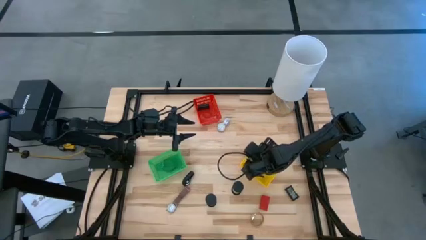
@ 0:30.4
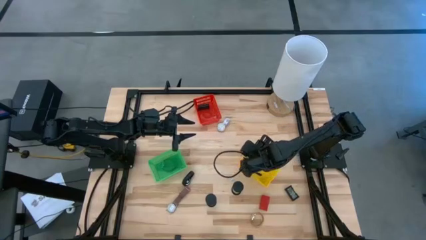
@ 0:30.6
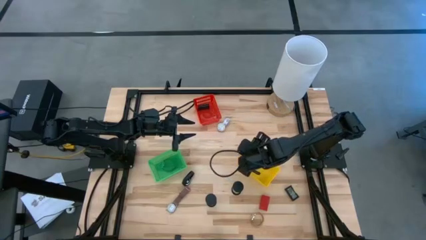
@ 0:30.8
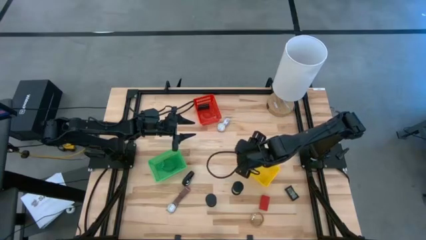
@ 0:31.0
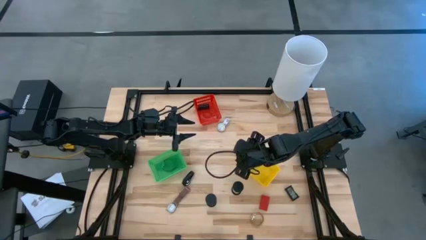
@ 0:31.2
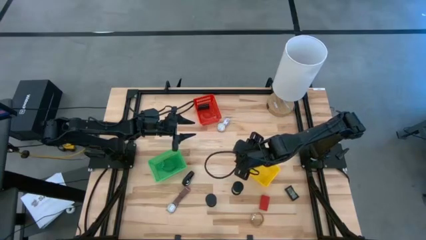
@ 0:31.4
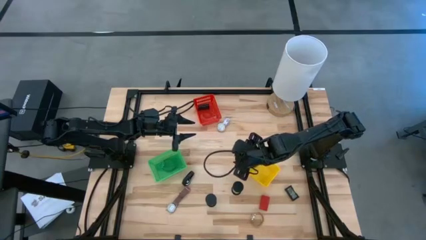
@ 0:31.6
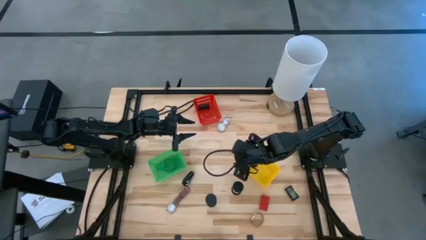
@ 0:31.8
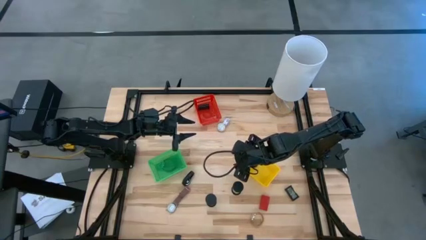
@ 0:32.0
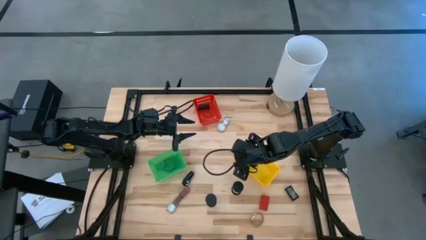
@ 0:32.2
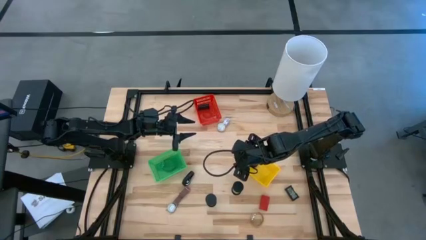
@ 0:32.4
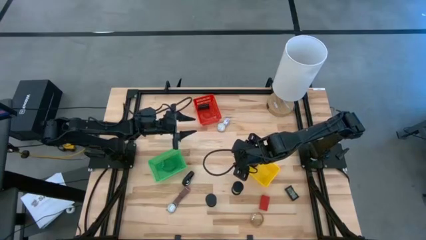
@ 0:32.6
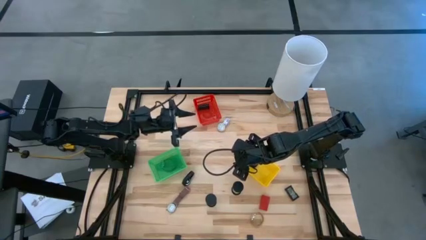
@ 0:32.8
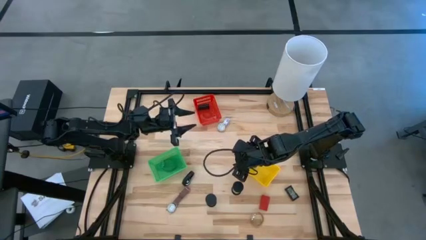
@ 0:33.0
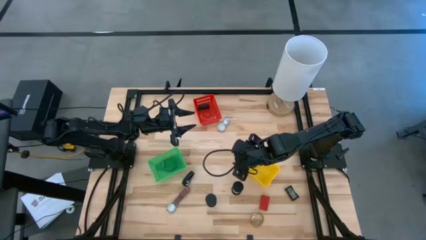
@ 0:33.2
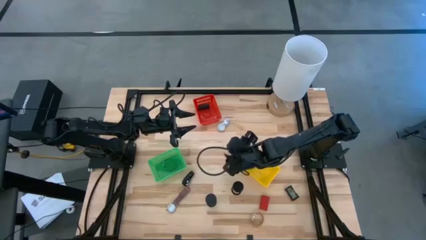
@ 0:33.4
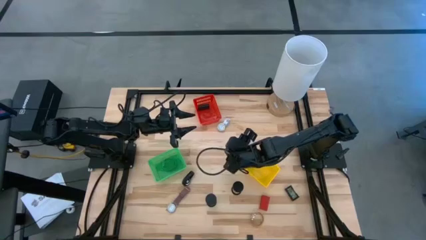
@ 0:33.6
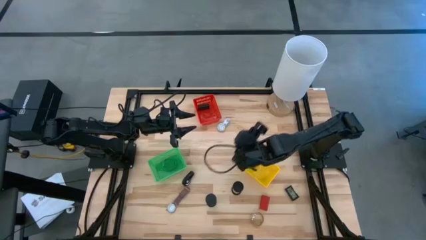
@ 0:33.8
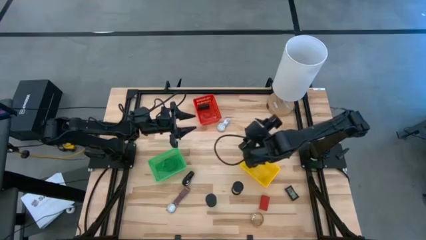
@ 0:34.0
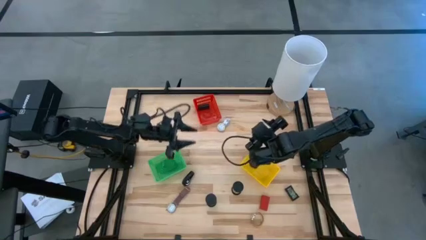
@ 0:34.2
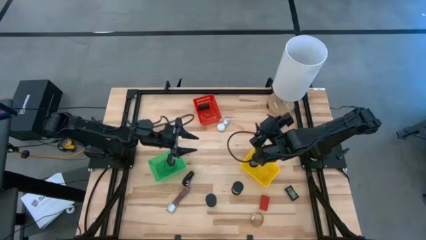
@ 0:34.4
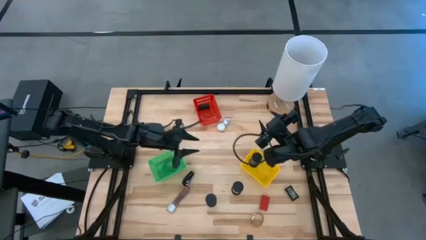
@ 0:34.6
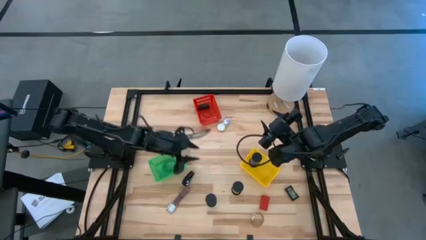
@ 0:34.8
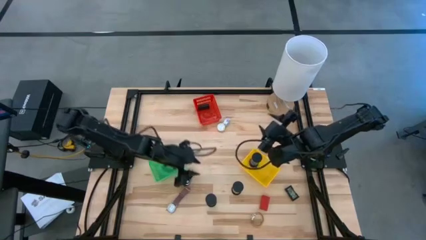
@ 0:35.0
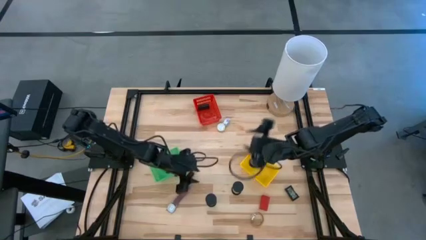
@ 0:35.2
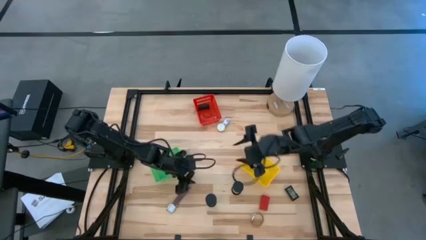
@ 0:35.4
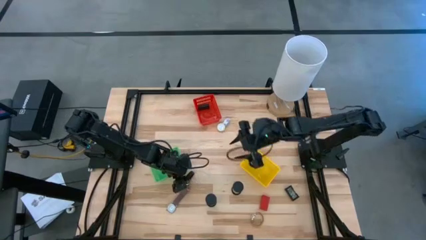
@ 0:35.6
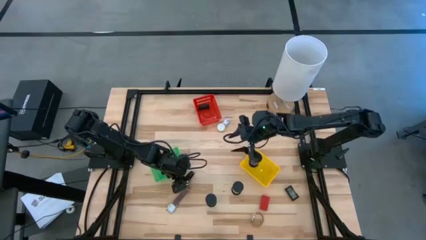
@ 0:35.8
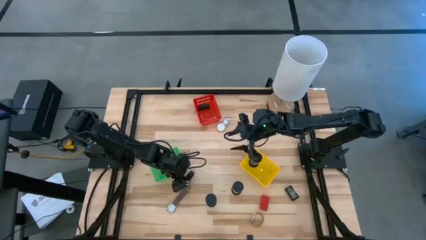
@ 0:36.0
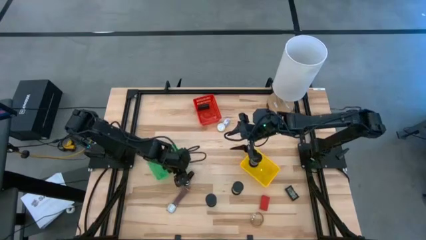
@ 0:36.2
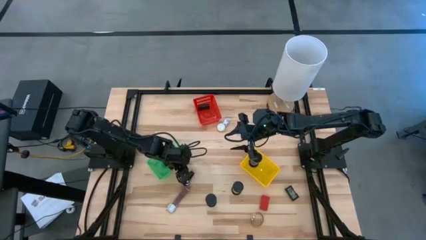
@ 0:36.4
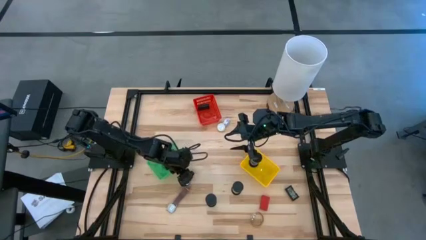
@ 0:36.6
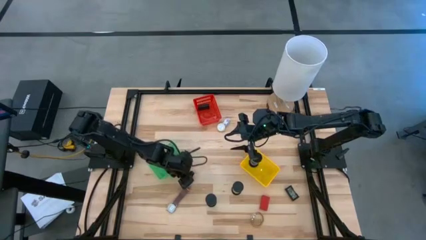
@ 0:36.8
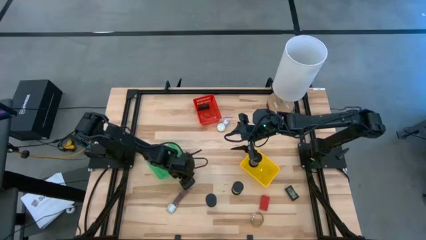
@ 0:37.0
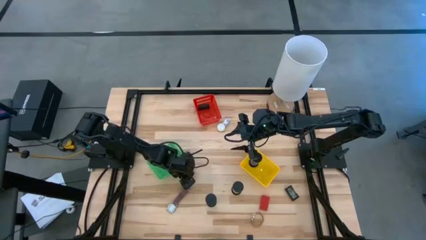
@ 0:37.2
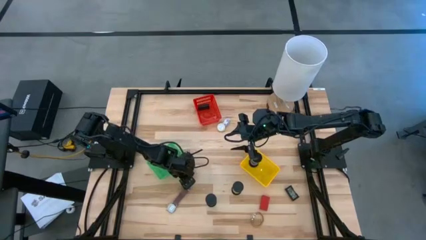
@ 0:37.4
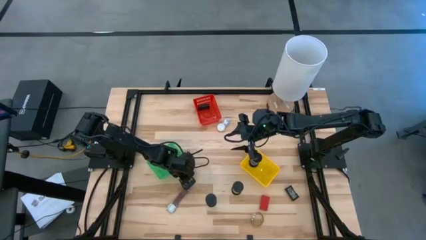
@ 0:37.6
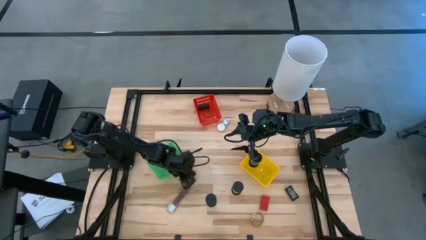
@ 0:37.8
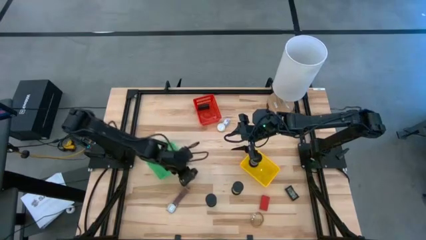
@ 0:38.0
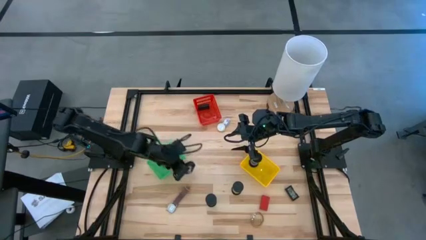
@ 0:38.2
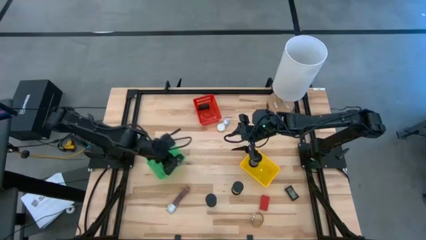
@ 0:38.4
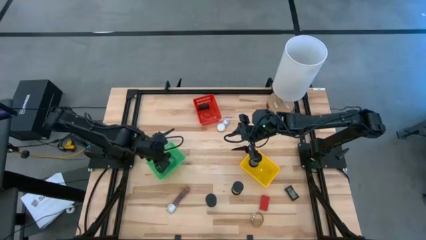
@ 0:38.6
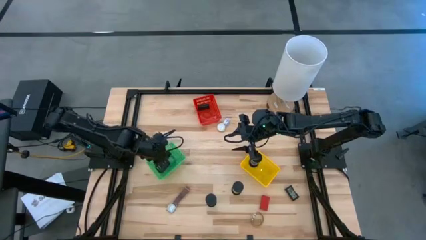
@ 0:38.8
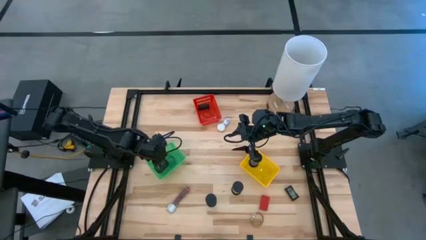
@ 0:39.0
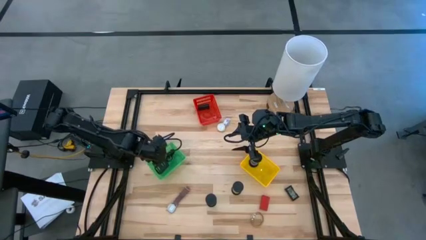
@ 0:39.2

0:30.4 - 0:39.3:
Task: Pick & Place Office items
Put the black wrist watch into the green bin

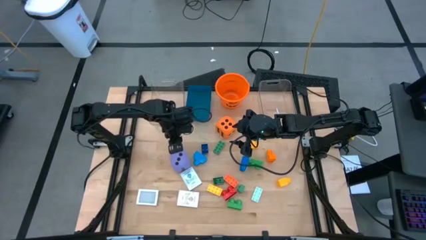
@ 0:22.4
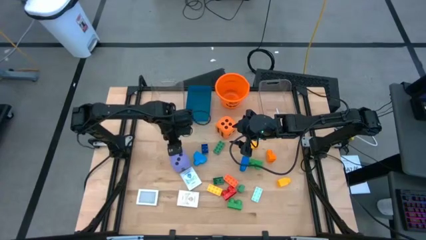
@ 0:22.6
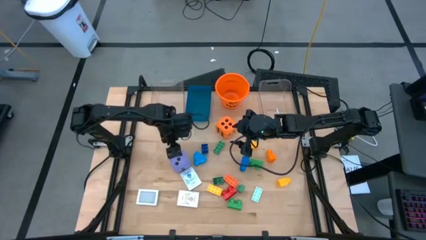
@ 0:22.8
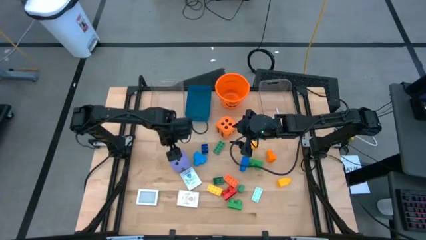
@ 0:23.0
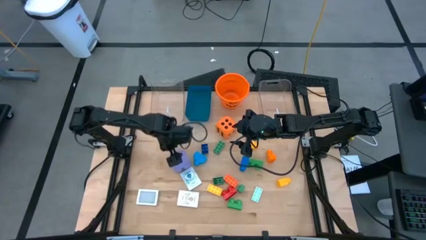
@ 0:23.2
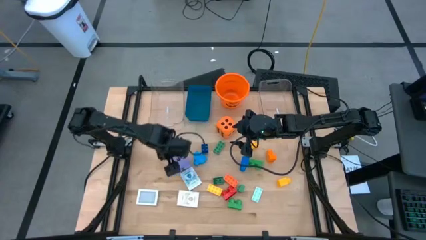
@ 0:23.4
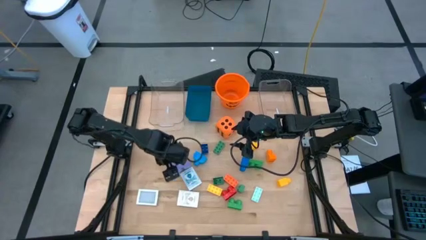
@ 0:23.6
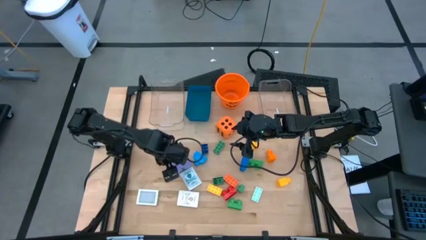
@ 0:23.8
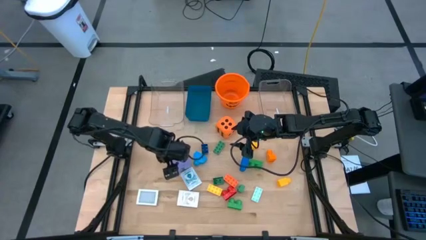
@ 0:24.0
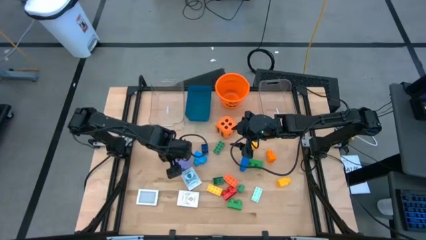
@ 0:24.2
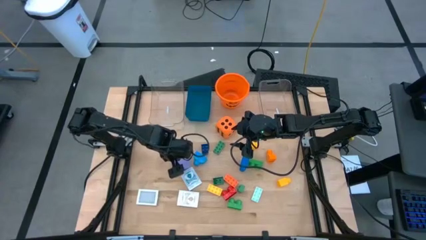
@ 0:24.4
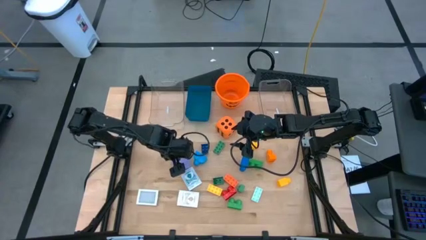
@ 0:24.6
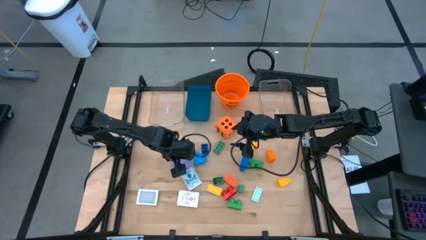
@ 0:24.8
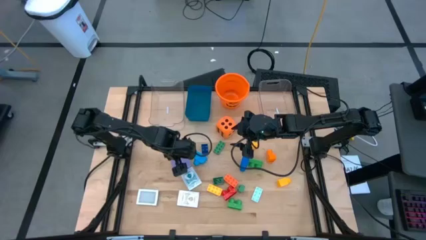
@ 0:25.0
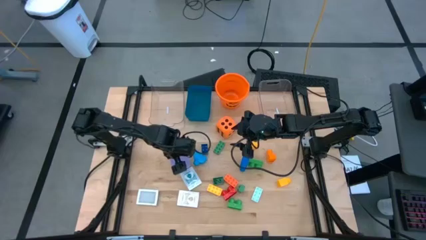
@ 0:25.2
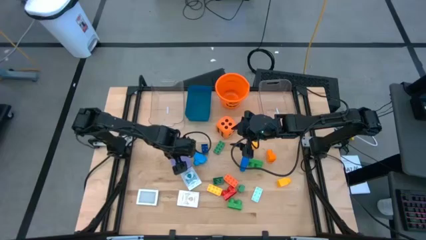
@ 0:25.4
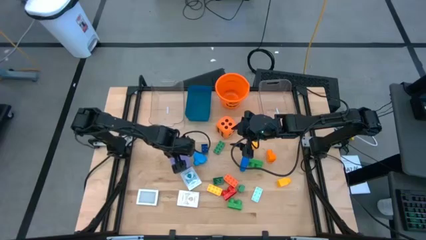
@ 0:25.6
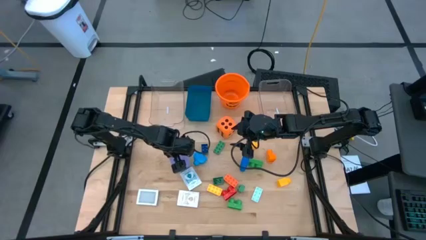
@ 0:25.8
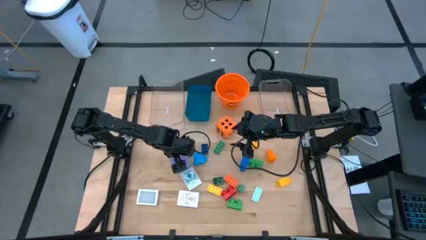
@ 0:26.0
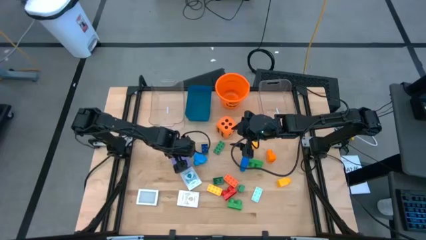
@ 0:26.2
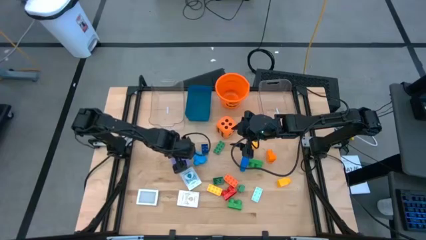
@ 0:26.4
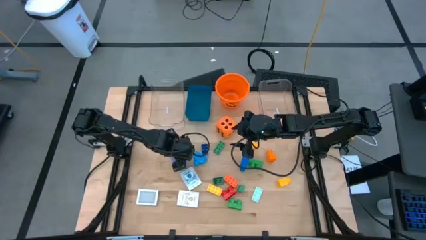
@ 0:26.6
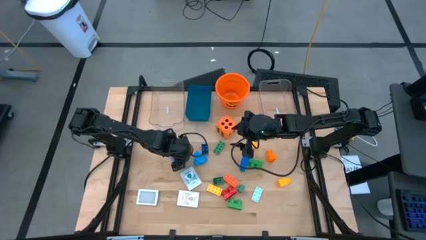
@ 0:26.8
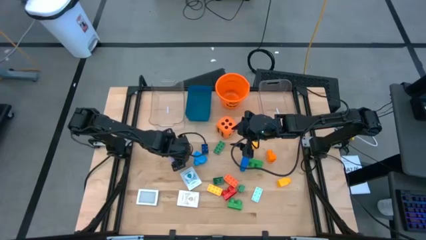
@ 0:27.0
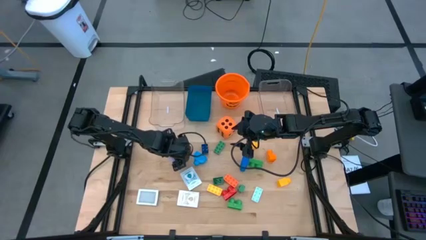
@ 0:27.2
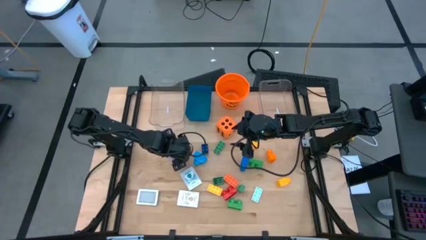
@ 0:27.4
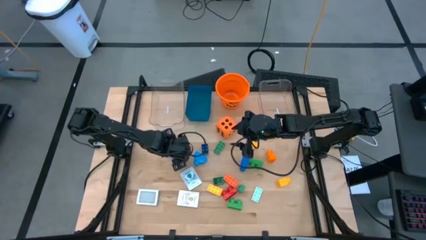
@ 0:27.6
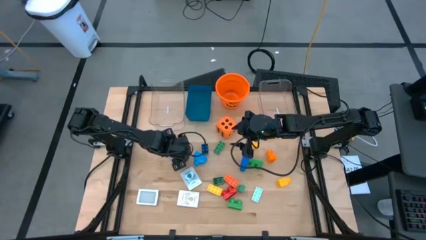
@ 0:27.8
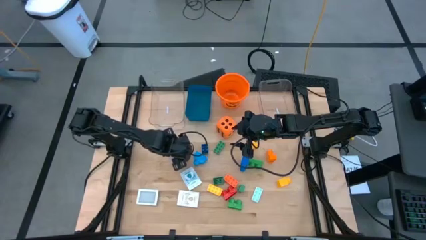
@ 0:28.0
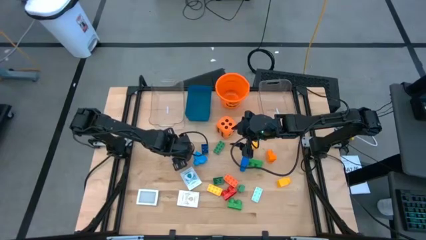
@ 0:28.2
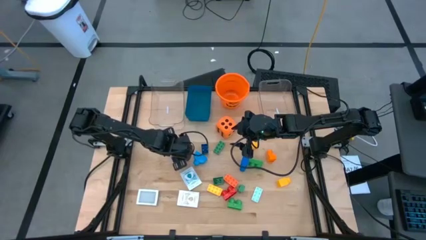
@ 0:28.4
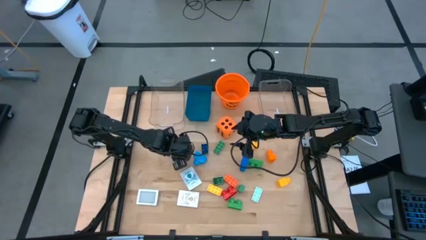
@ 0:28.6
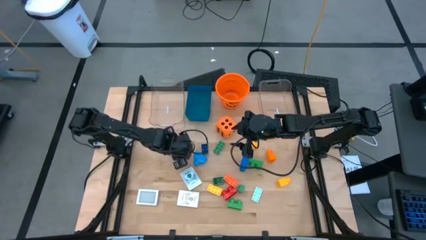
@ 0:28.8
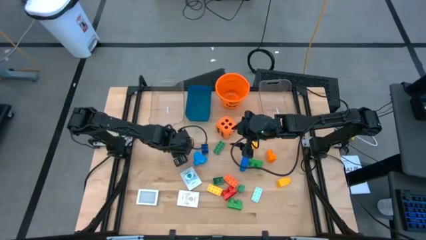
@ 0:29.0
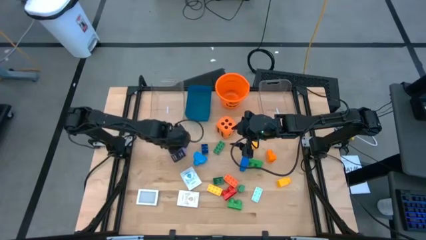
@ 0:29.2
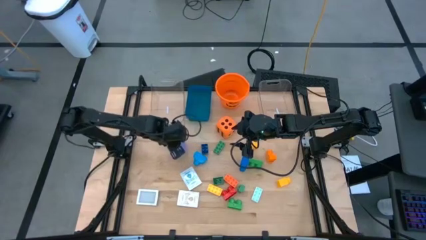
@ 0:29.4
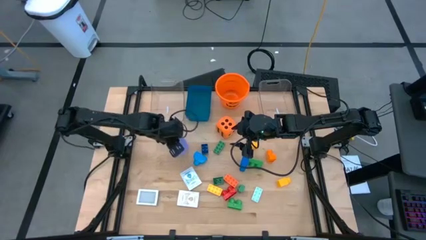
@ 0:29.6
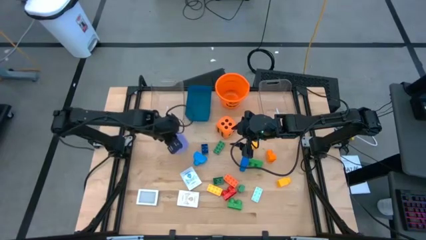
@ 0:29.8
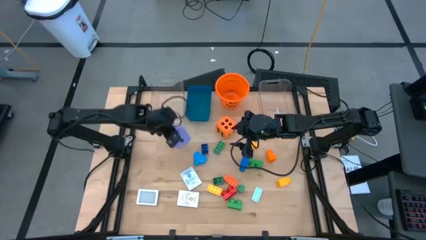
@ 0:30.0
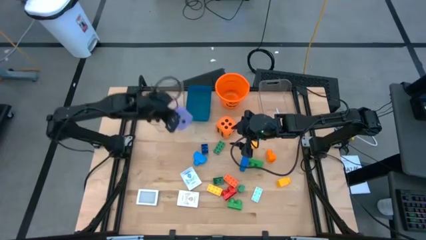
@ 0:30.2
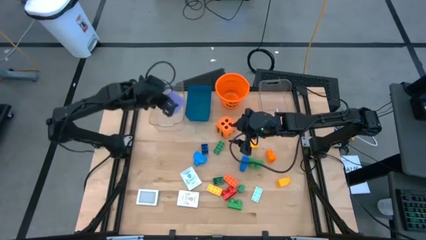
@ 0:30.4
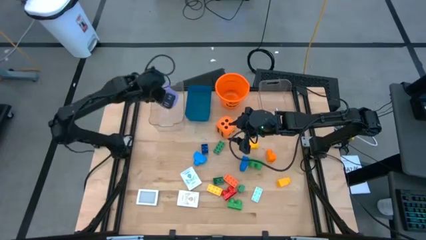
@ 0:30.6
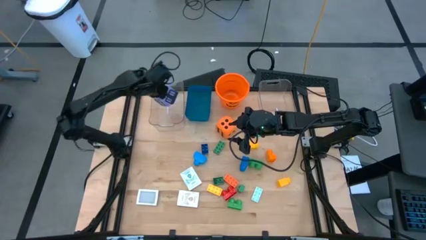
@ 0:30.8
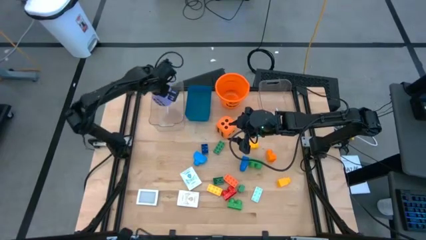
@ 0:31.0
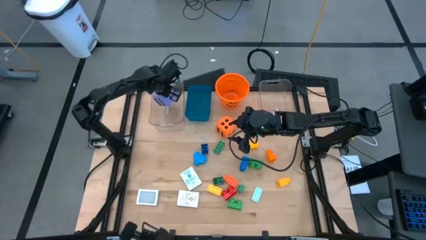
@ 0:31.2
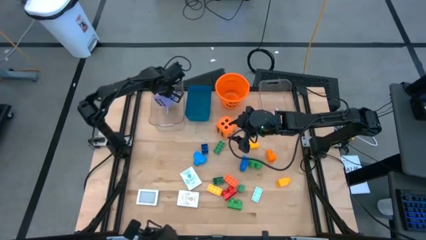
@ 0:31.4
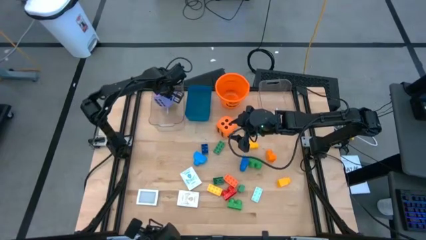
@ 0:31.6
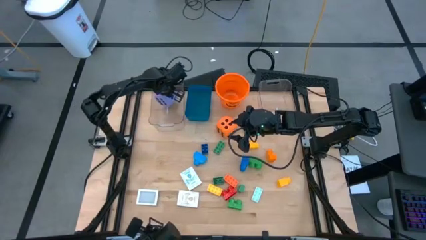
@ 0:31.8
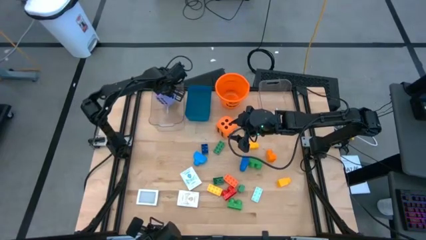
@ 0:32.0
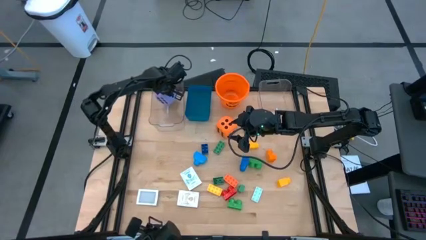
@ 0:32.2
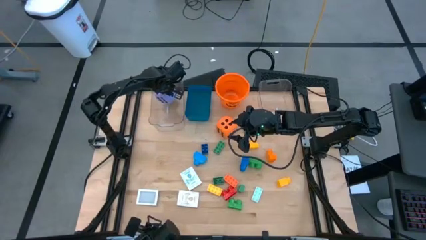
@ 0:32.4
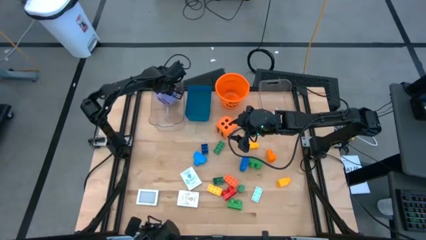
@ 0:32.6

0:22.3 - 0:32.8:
Task: Pick & Place Toys
Put the violet dice into the left transparent bin
